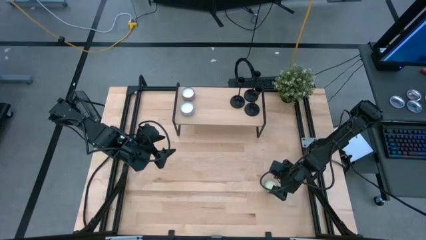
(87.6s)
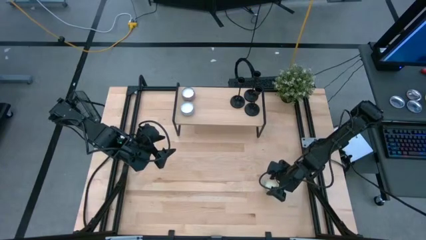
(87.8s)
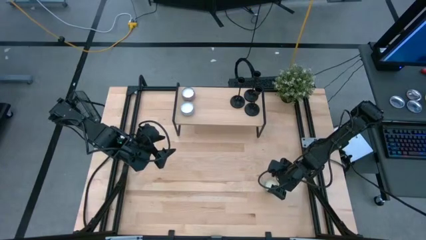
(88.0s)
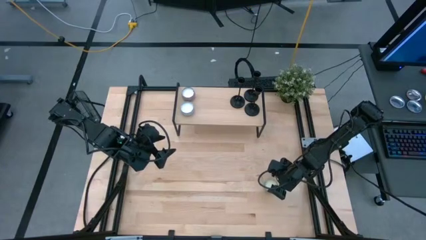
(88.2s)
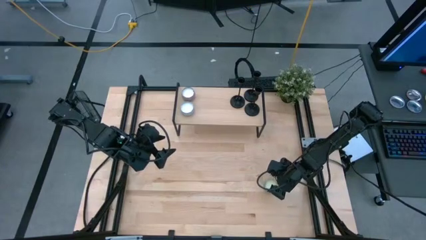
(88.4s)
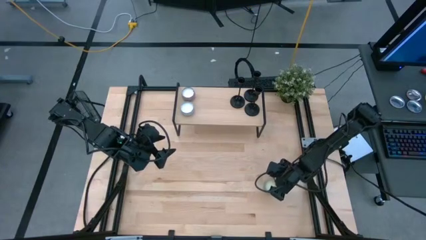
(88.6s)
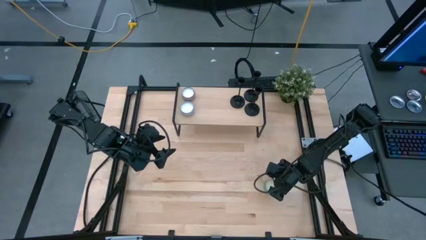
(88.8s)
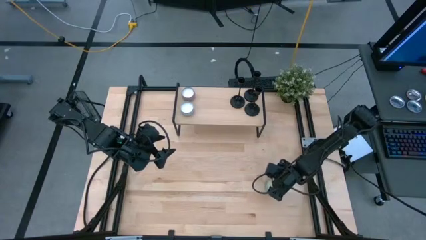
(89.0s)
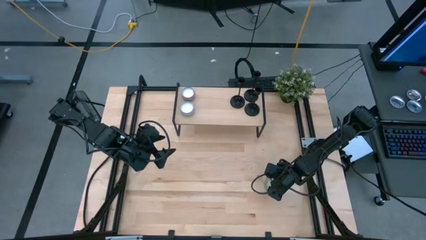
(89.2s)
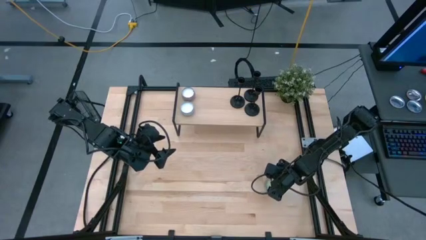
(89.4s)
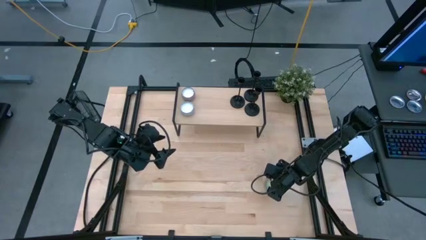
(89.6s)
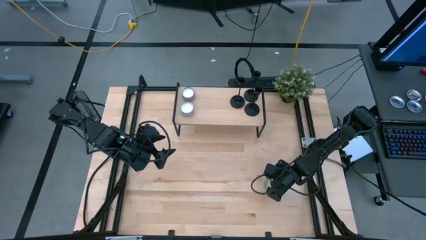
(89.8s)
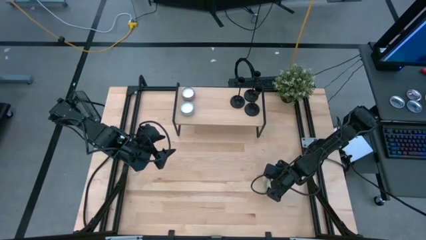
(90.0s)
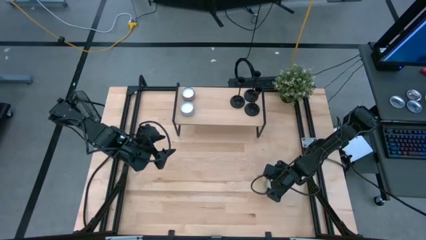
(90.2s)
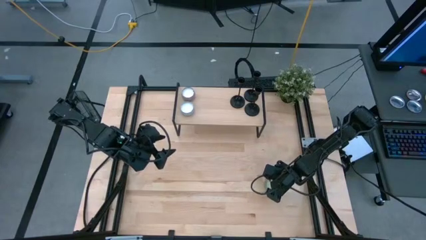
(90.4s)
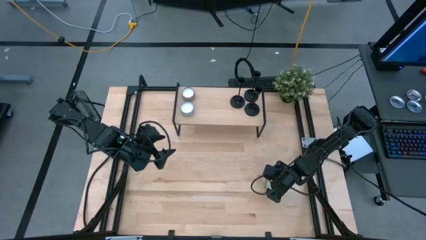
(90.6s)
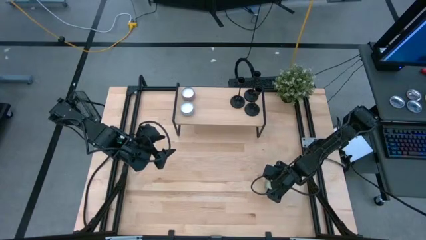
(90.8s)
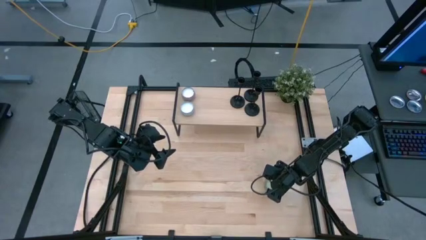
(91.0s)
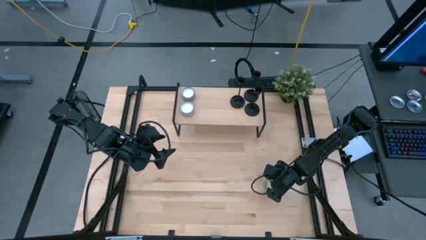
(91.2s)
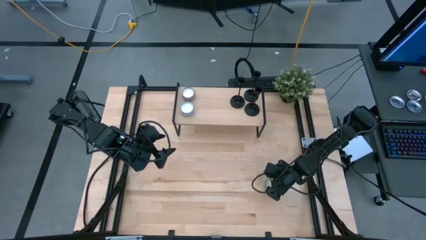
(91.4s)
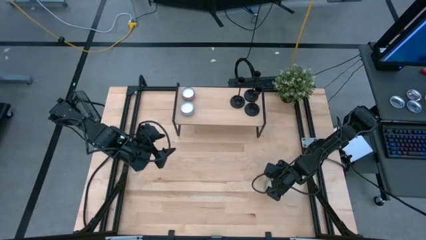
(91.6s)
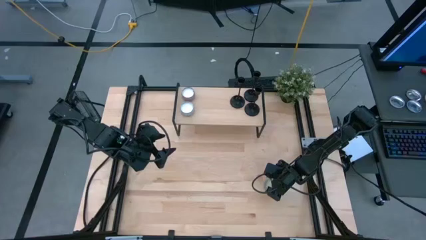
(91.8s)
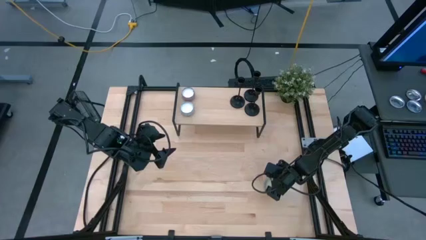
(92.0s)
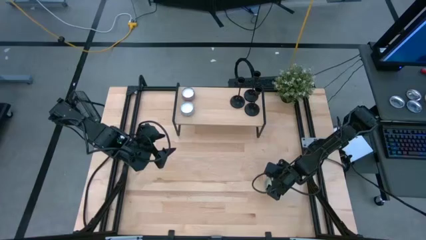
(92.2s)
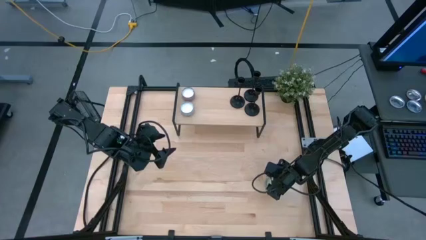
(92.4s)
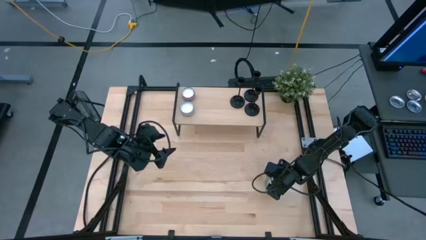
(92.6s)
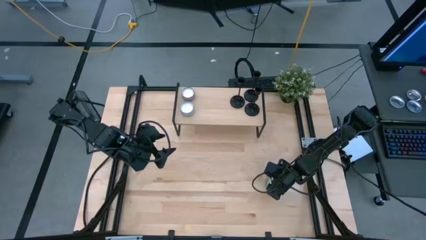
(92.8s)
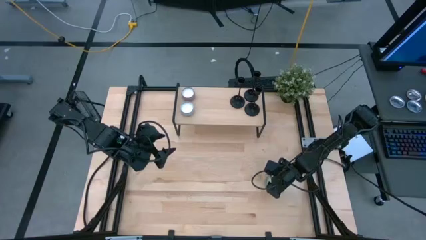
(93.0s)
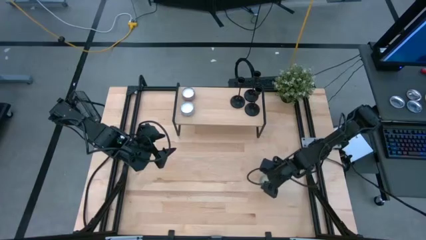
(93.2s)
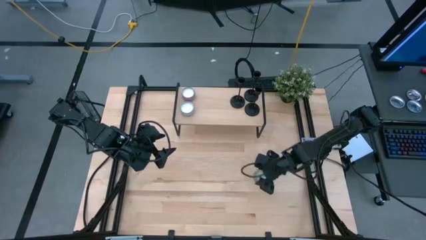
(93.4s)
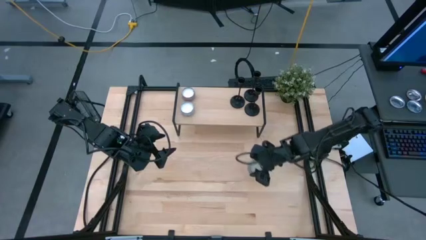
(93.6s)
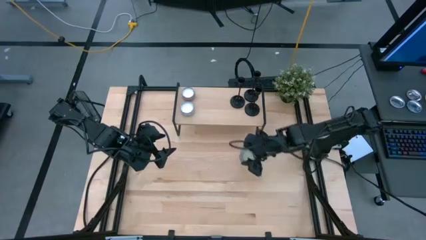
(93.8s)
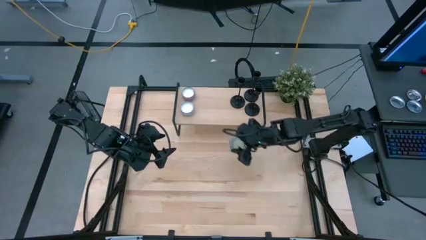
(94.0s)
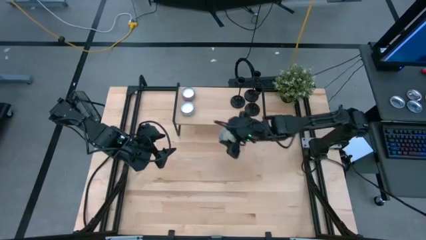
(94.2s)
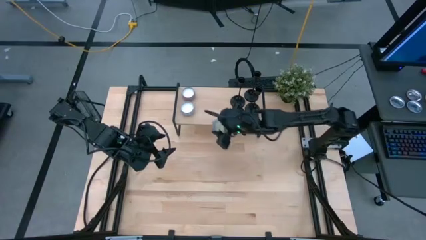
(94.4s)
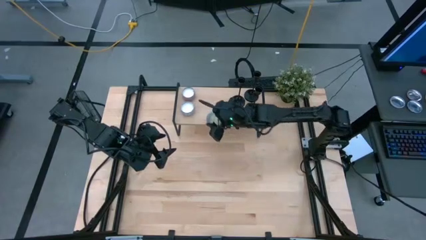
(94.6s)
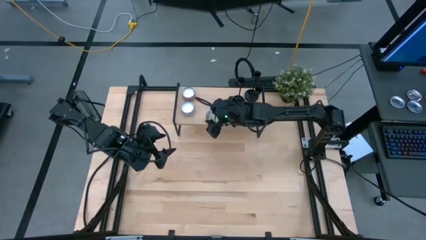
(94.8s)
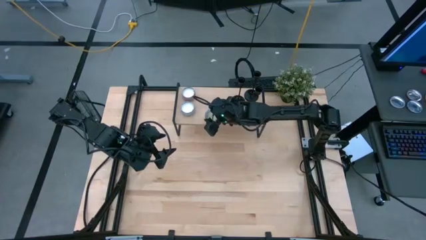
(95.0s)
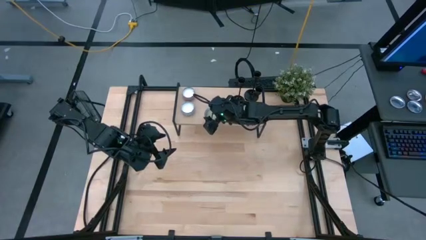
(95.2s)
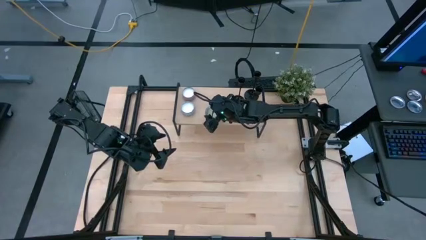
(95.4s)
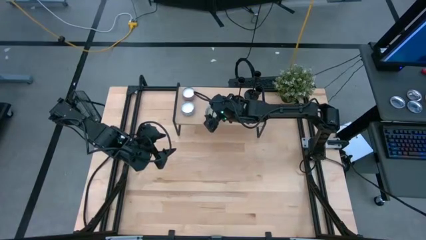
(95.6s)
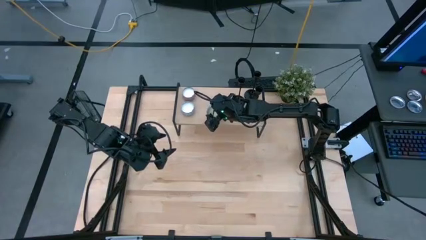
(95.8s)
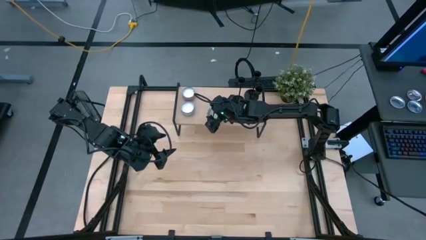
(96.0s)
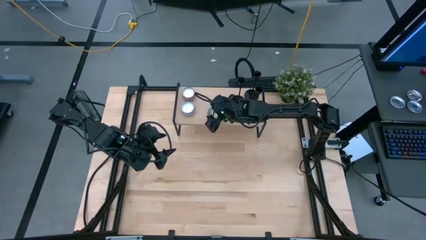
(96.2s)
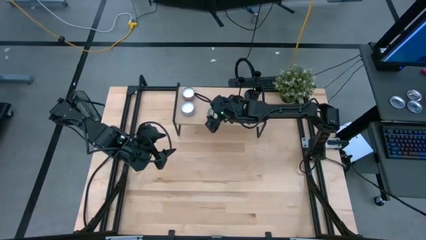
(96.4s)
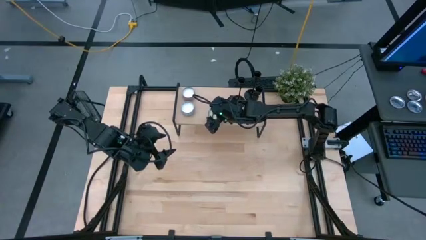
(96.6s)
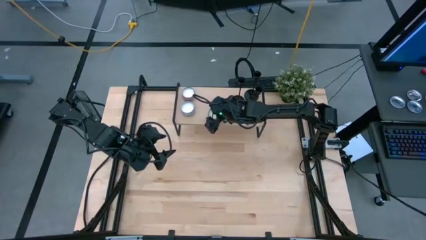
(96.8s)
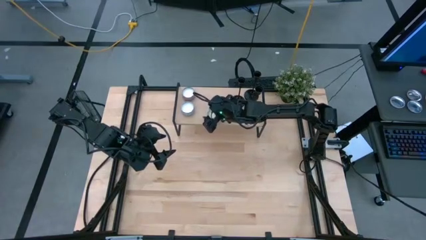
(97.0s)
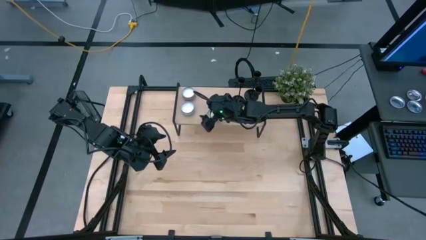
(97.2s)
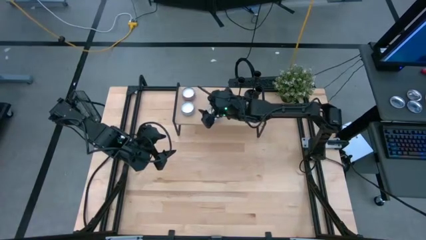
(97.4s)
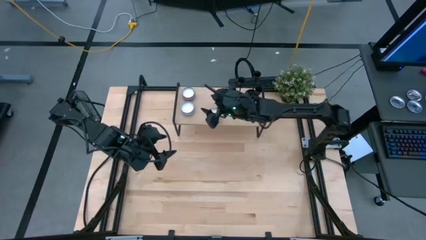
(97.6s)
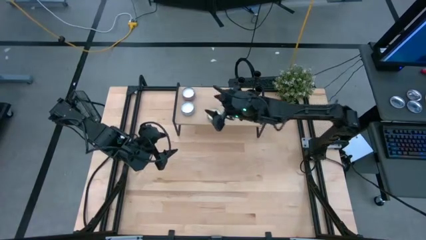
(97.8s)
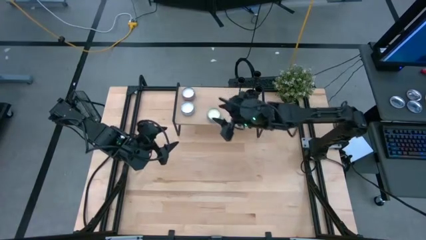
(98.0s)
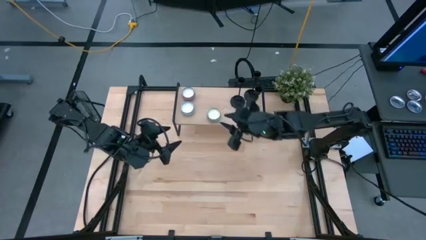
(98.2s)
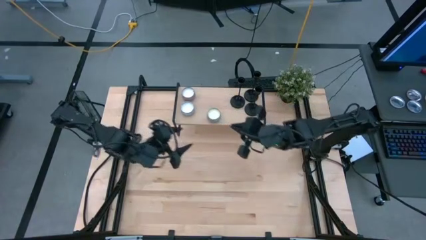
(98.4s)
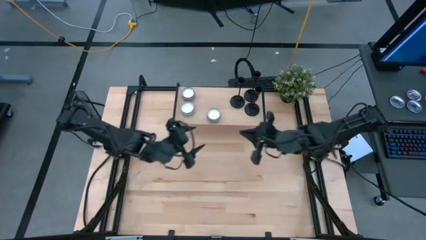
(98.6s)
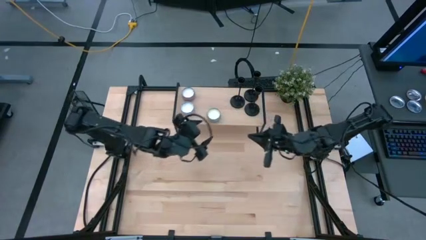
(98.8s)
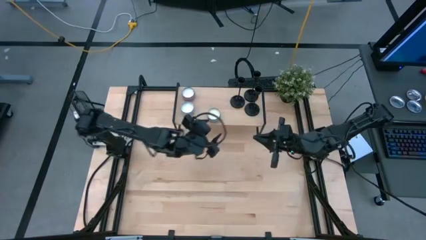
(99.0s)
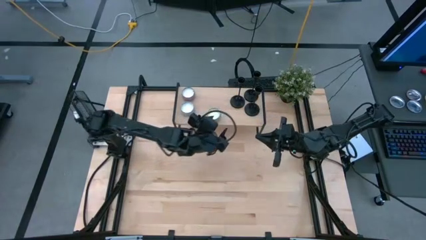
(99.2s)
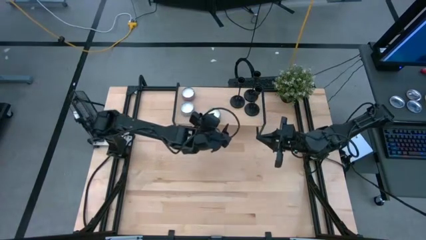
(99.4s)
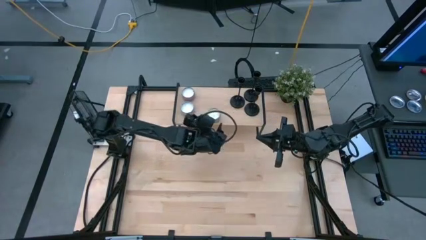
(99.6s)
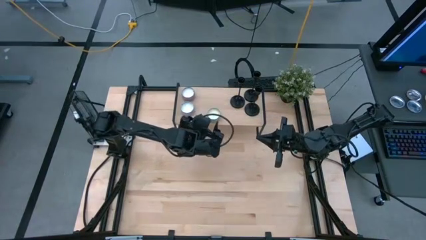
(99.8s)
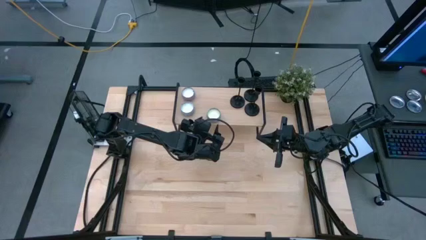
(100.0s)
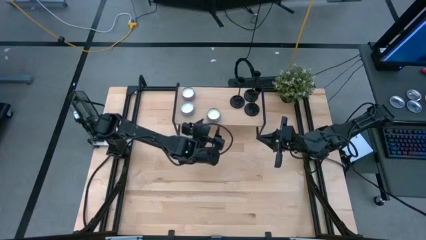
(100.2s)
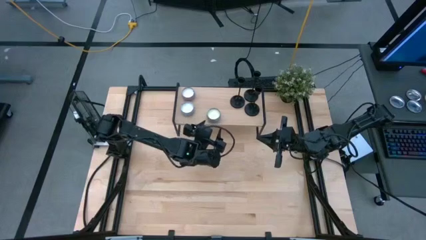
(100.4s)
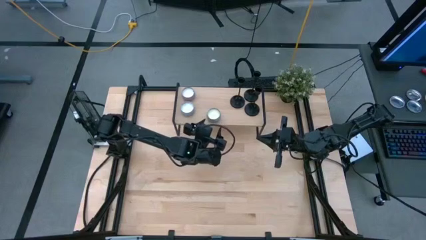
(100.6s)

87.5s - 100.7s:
Task: Pick & Place candle stick holders
Put the blue patterned scented candle on the shelf

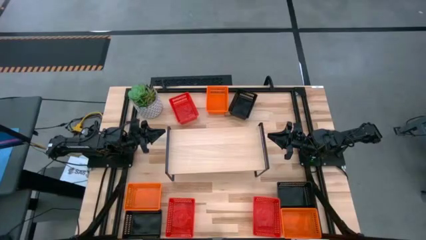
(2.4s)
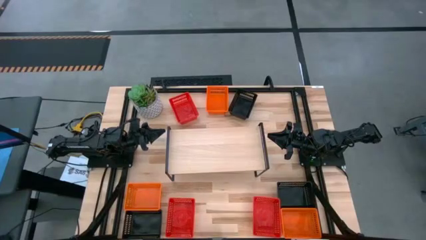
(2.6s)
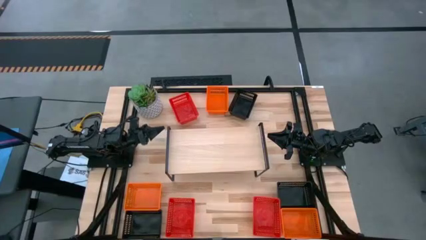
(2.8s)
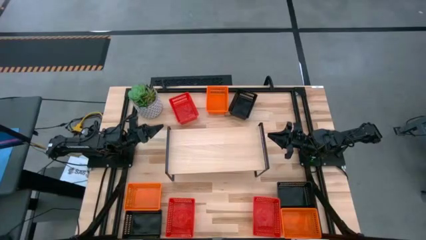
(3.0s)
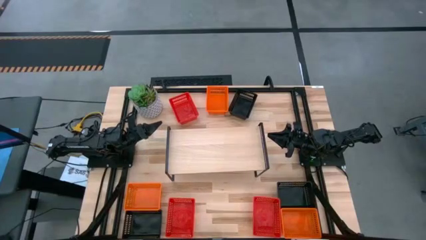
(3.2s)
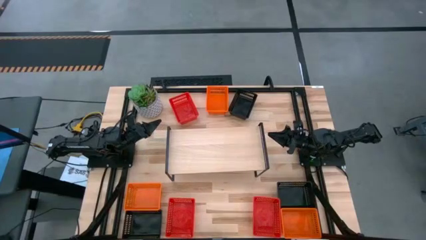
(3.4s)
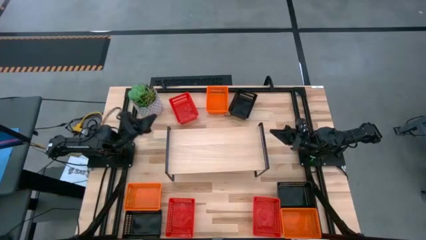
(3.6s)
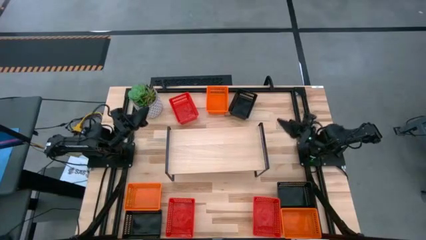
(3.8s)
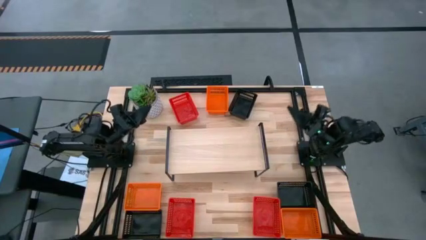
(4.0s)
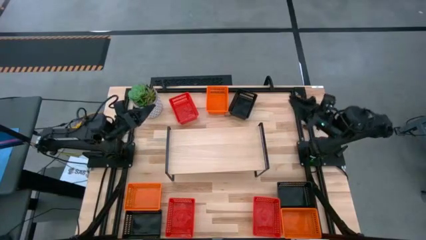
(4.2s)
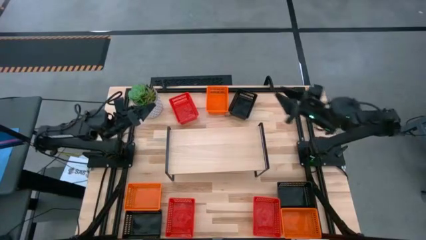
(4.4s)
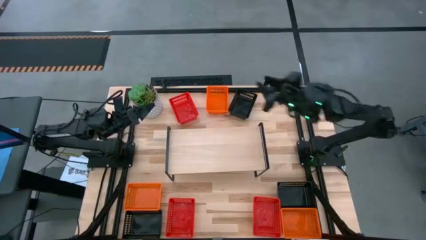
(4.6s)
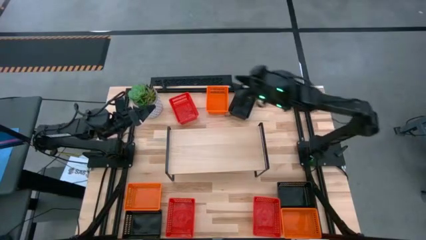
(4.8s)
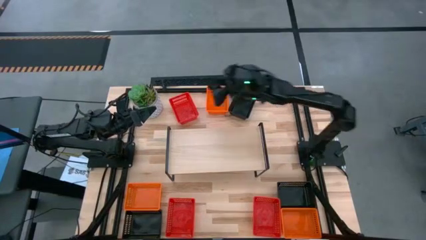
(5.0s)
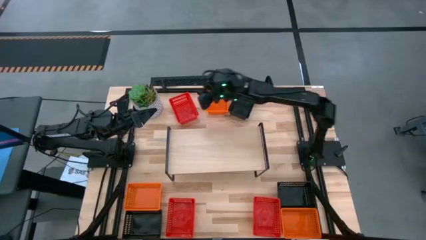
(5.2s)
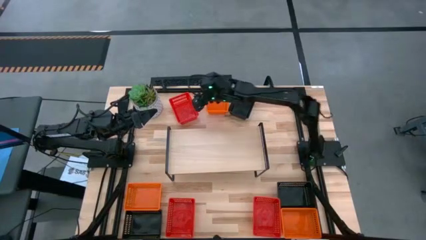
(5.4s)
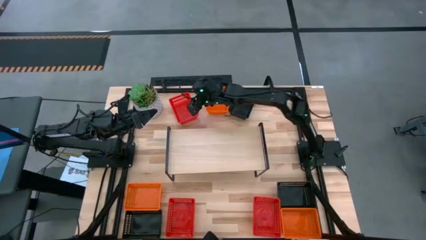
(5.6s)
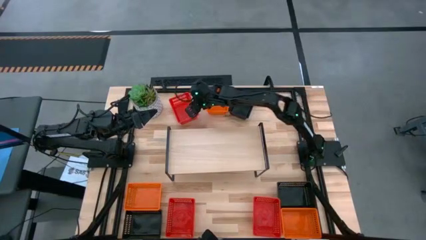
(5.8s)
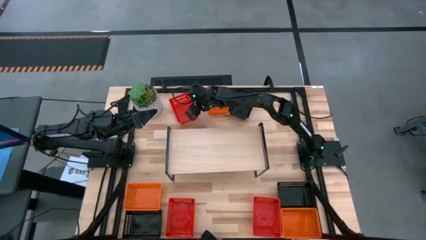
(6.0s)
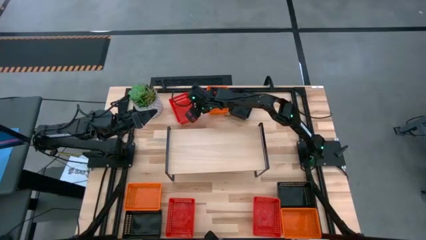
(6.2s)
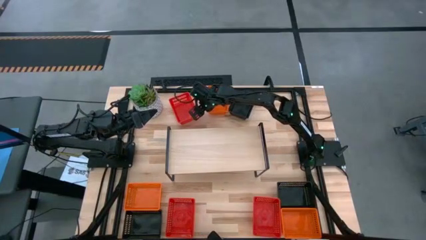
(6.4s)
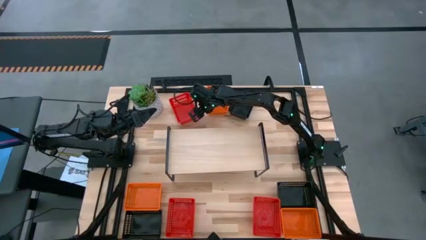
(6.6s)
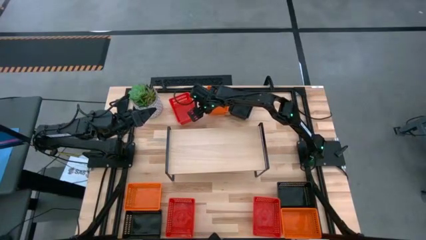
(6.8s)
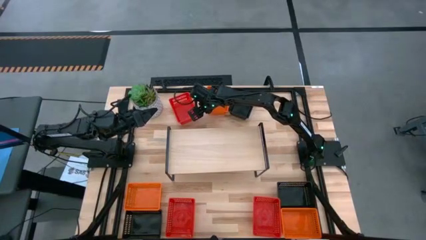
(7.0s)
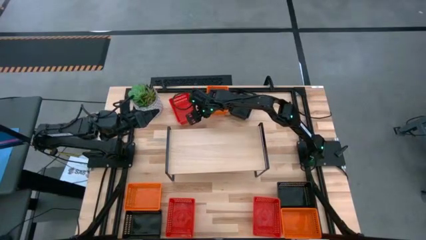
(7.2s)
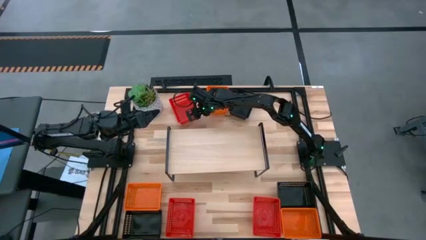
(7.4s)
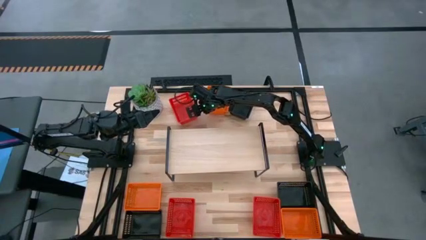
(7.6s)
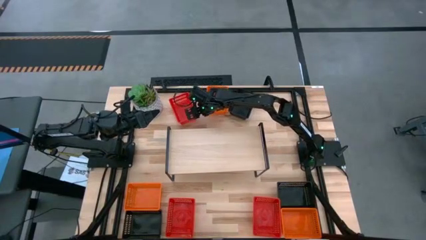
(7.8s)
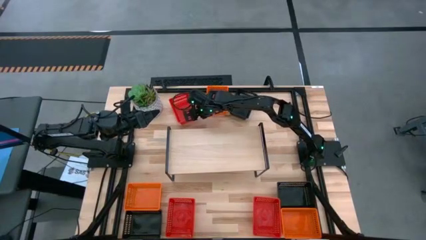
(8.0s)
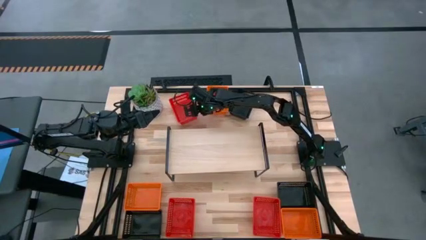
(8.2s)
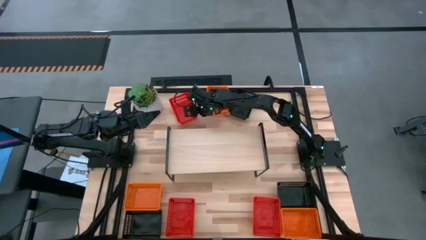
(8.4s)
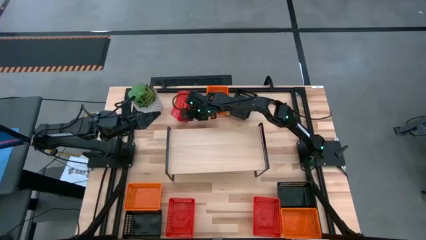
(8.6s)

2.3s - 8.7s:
Task: Stack baskets on shelf by color
Put the top red bin on the shelf
